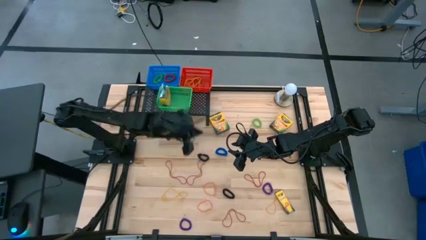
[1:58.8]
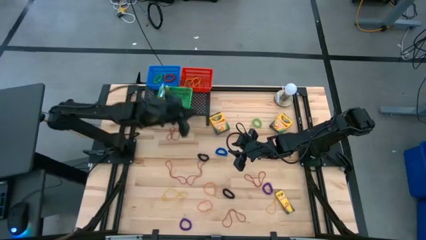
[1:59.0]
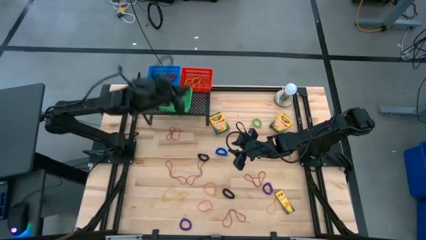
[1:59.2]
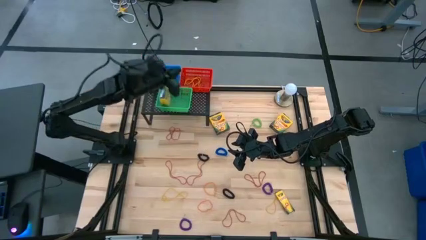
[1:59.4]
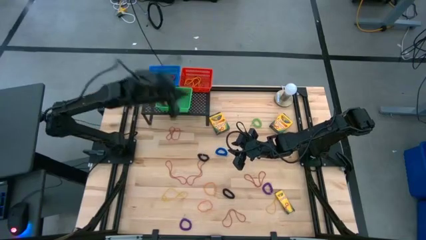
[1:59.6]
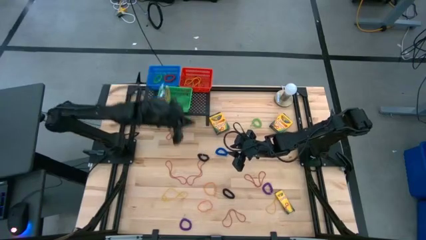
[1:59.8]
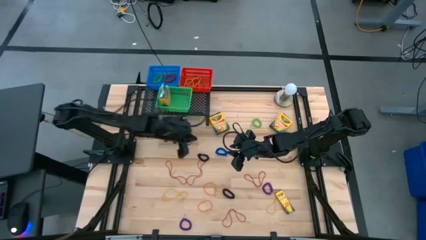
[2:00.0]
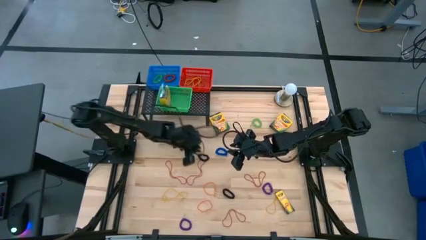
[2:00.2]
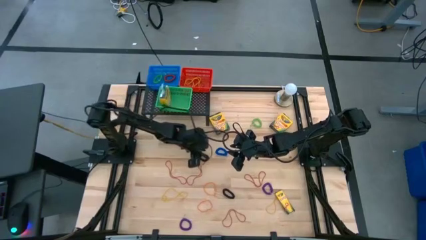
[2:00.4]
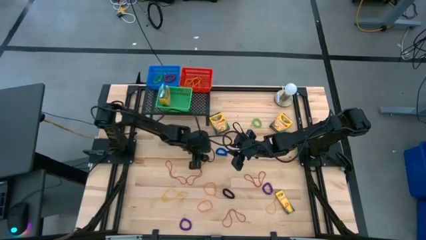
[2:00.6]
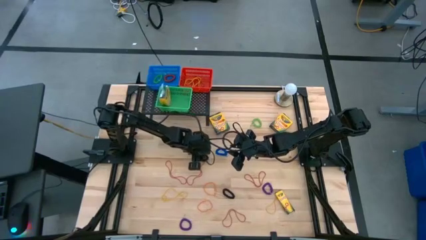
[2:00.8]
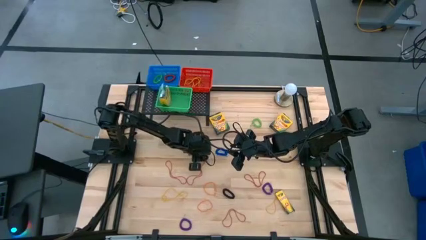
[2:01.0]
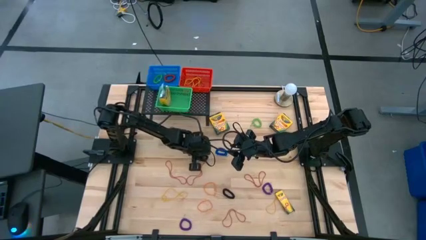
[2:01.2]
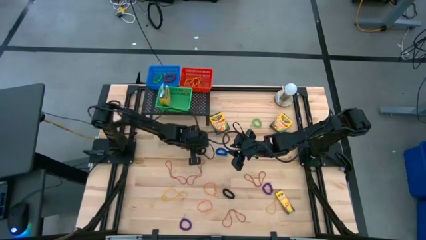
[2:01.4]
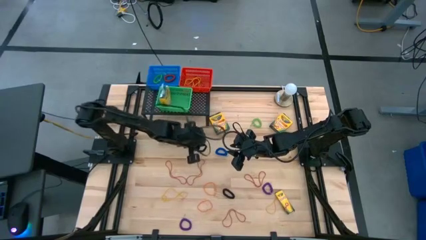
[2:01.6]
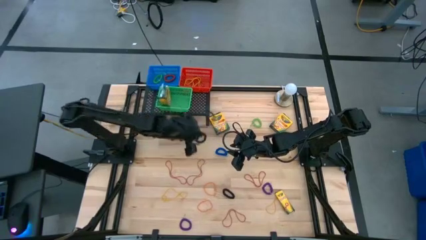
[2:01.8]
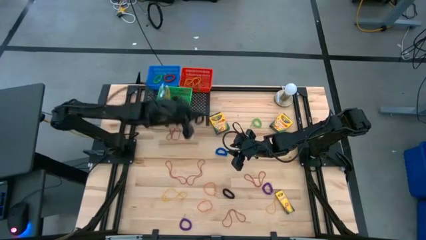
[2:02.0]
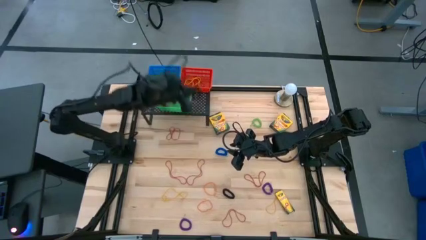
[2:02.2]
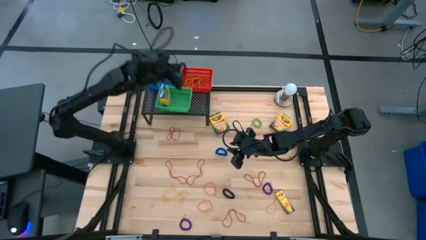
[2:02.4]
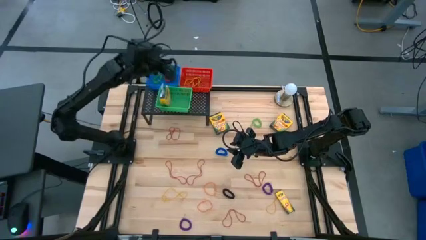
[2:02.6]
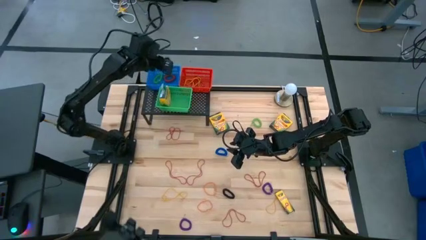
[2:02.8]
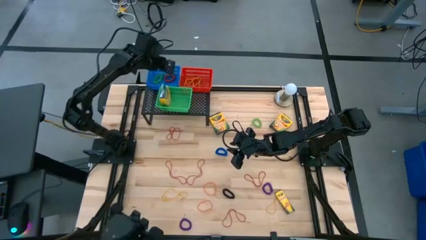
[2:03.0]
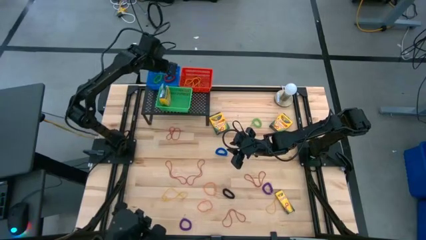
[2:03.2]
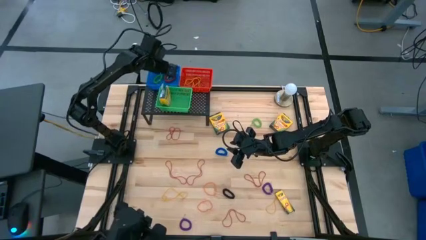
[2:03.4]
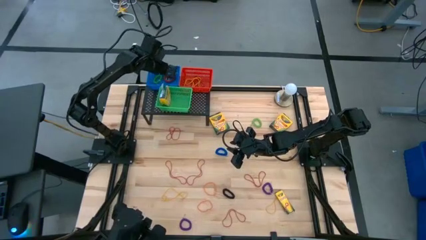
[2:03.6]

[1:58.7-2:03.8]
Task: Pick & Place Office Desk Supplies
Put the black spring keychain into the blue bin

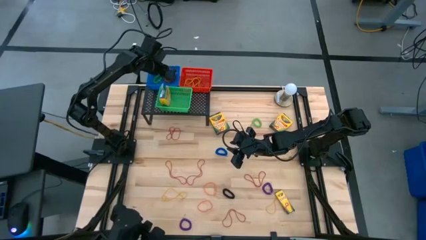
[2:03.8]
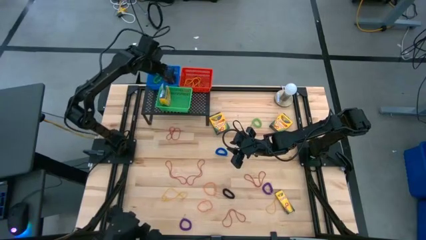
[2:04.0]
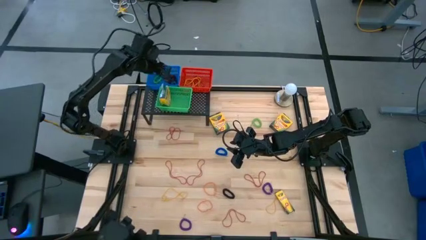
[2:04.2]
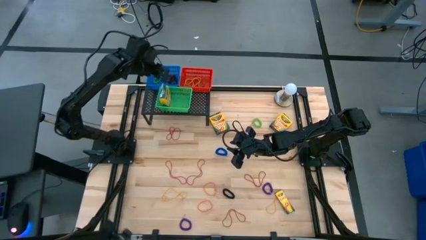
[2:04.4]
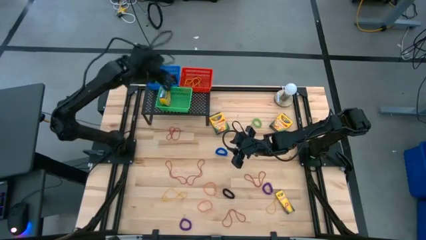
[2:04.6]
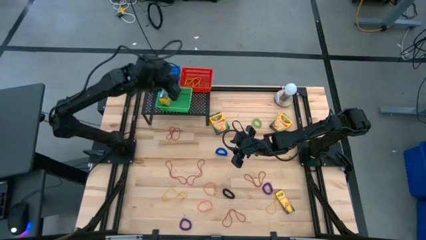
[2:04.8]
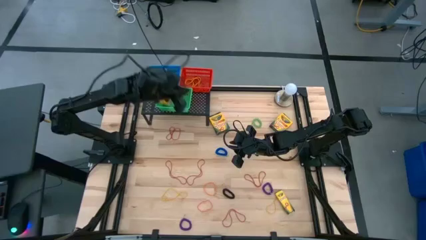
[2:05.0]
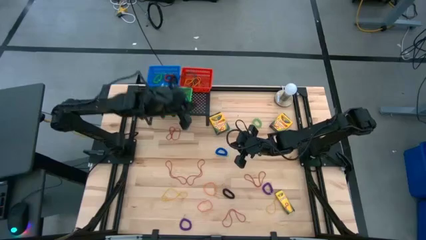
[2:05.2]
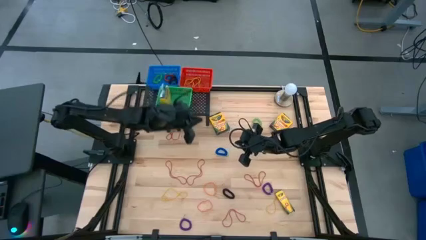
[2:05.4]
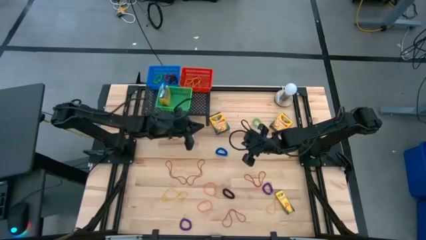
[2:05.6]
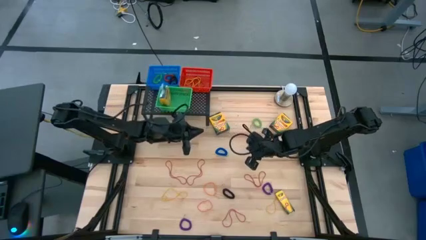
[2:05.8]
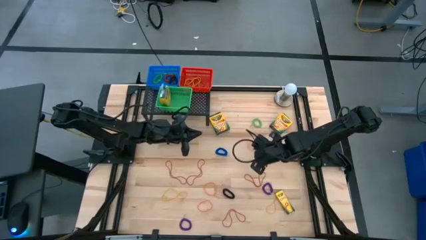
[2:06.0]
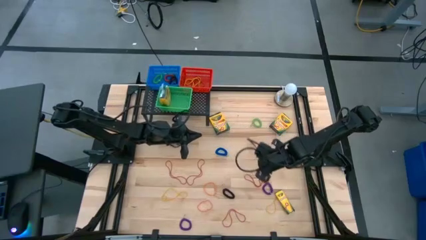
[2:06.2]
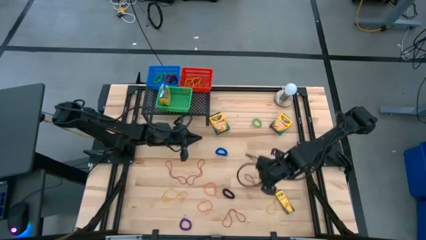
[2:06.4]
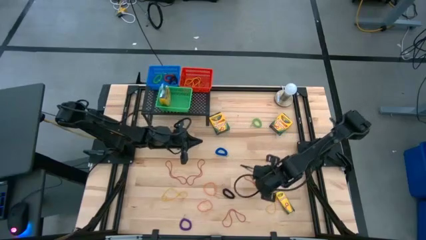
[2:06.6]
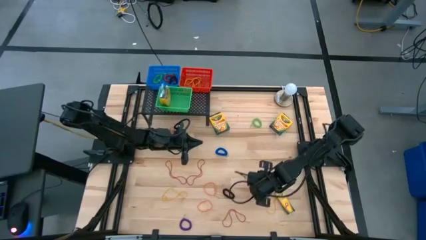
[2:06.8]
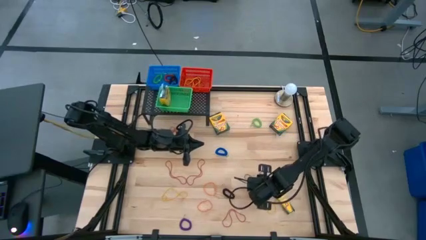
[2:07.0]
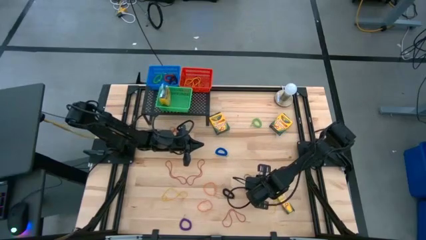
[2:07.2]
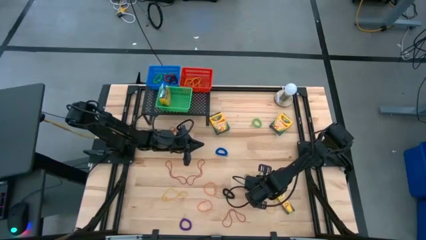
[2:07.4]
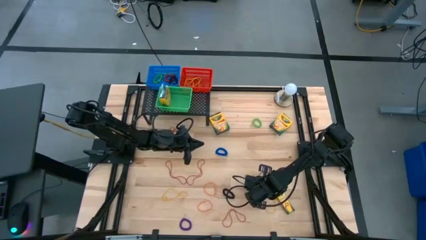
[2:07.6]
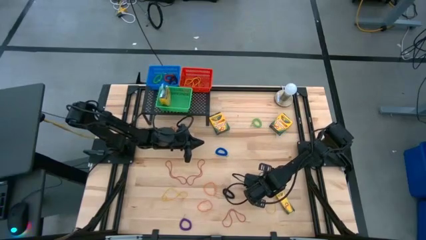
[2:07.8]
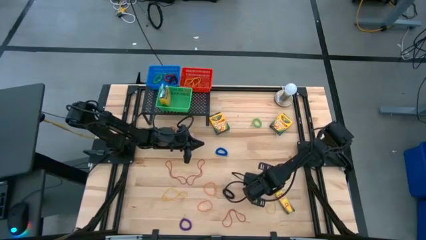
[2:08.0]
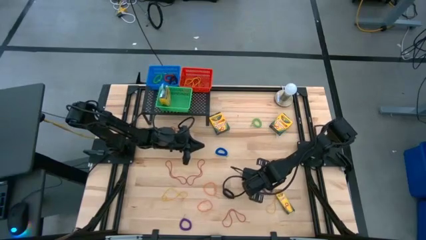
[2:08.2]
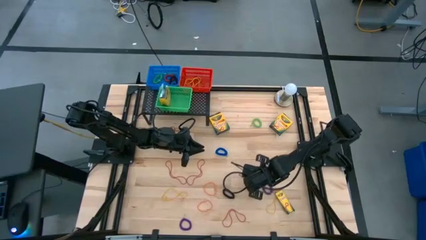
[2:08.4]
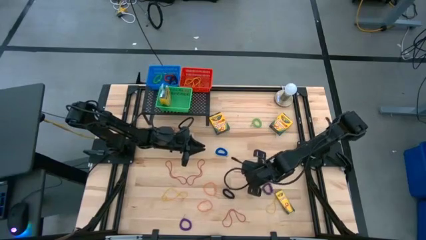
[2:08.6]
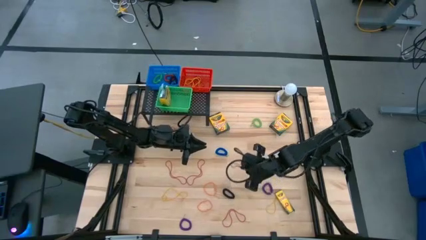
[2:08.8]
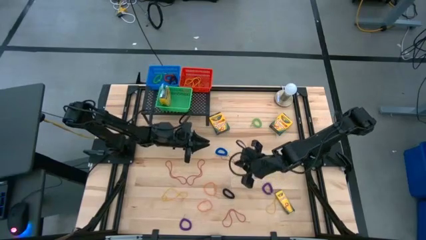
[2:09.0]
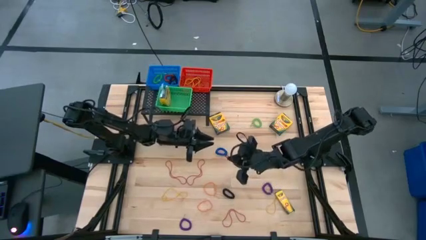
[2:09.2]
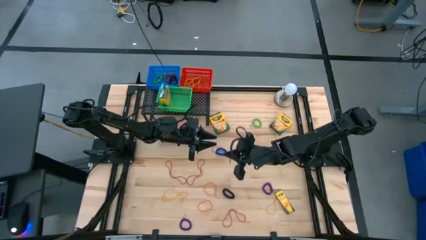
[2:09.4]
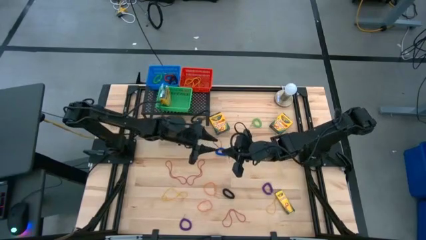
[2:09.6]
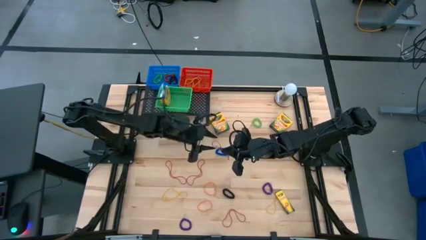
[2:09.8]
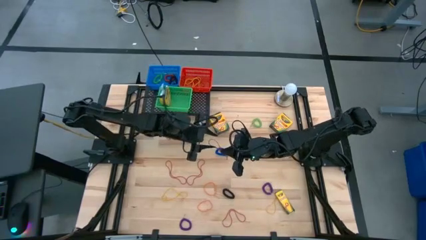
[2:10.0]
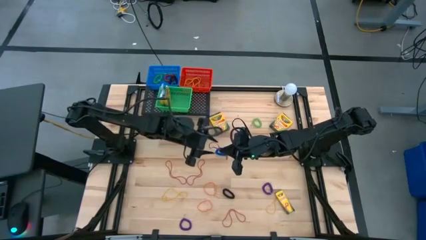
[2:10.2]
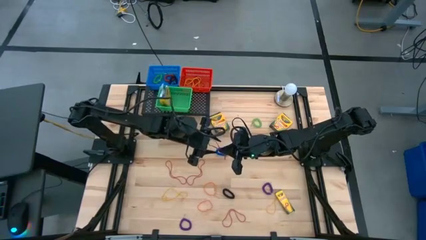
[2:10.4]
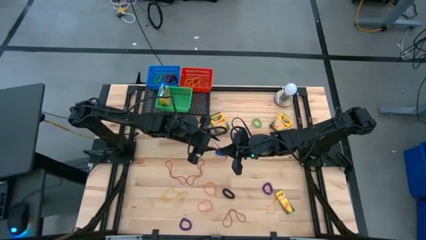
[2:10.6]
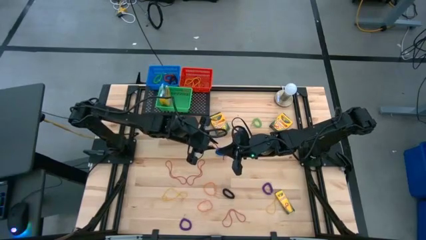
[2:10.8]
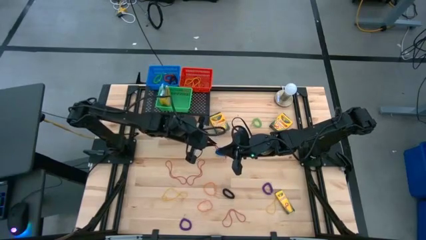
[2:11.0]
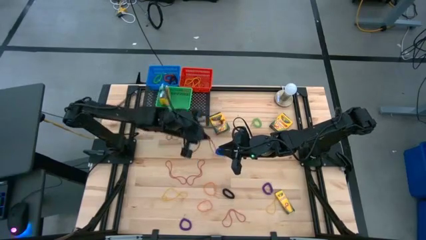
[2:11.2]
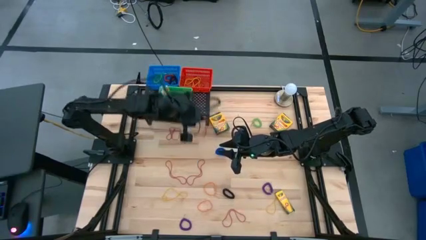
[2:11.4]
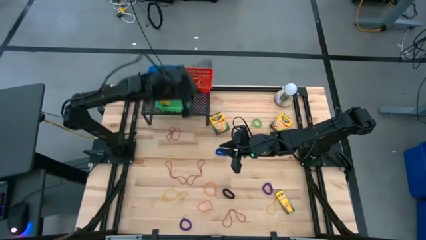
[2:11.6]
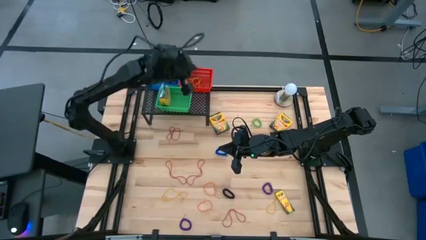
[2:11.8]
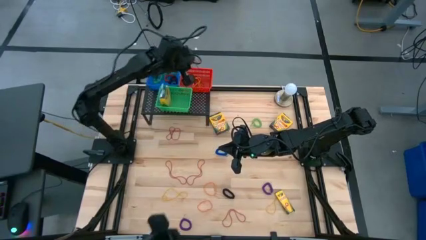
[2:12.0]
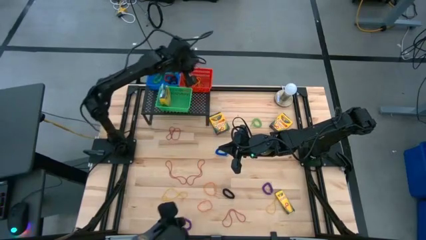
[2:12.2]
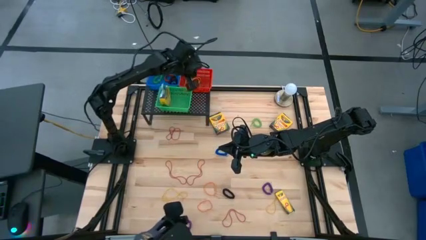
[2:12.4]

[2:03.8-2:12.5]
Put the red rubber band into the red bin
